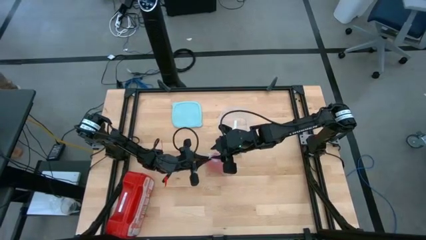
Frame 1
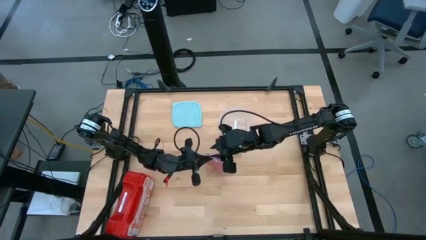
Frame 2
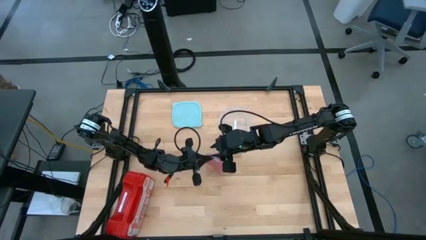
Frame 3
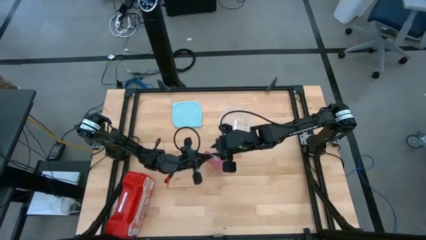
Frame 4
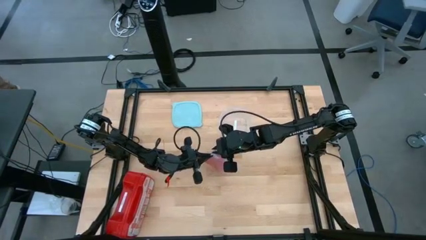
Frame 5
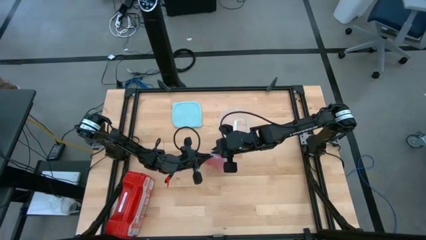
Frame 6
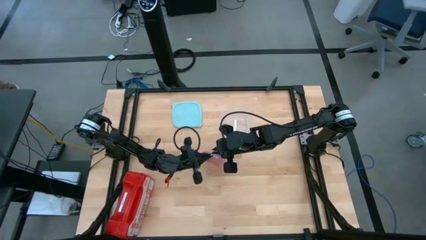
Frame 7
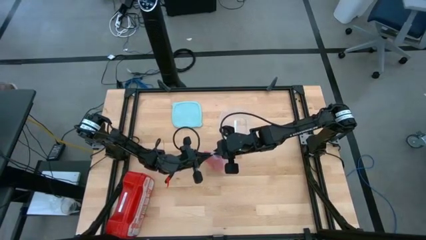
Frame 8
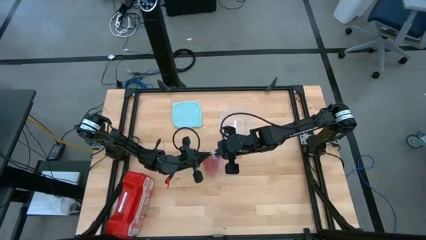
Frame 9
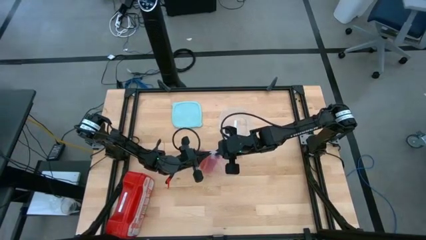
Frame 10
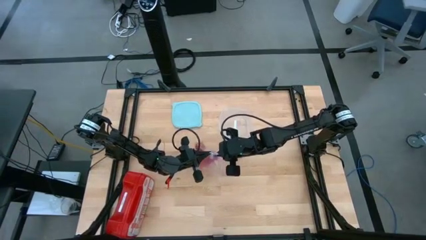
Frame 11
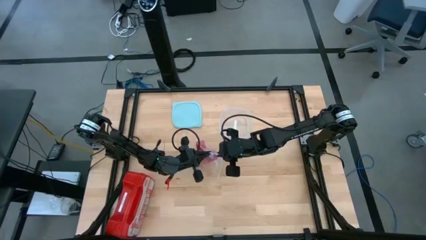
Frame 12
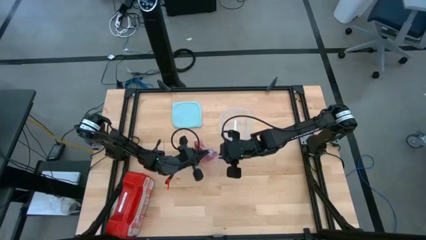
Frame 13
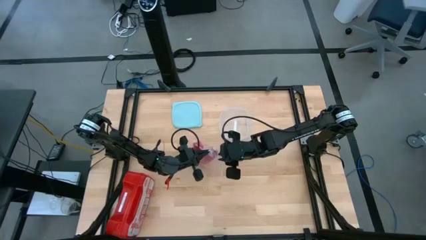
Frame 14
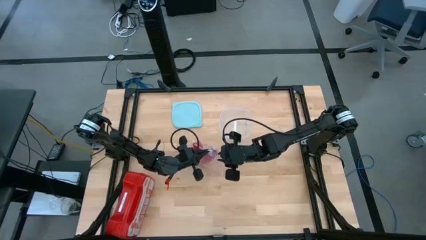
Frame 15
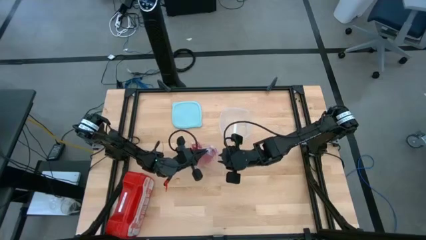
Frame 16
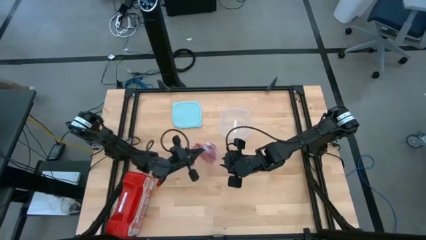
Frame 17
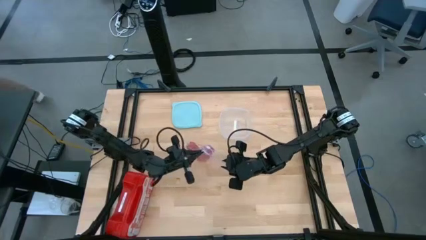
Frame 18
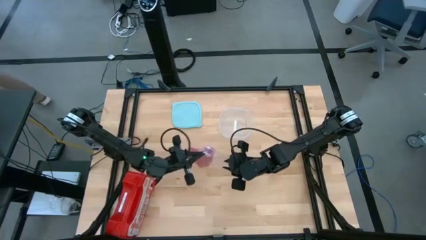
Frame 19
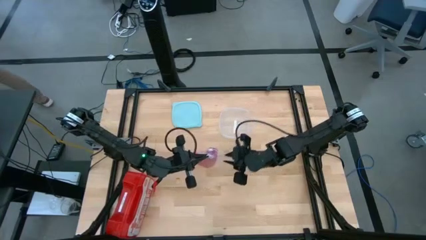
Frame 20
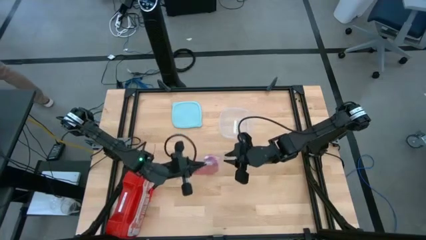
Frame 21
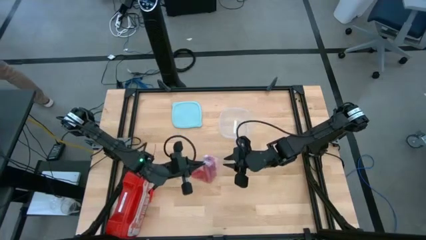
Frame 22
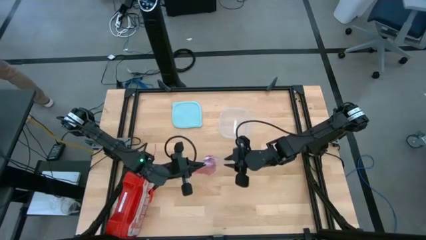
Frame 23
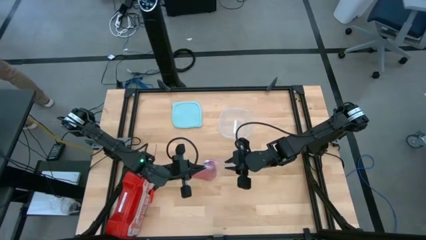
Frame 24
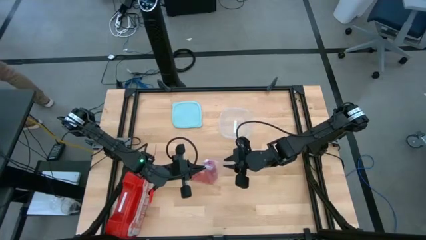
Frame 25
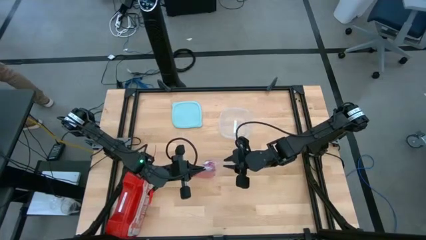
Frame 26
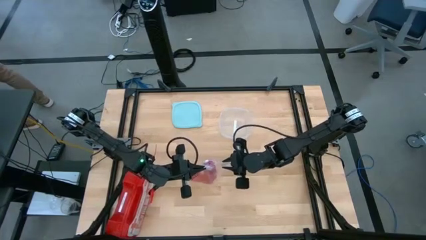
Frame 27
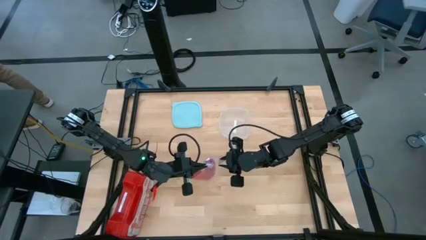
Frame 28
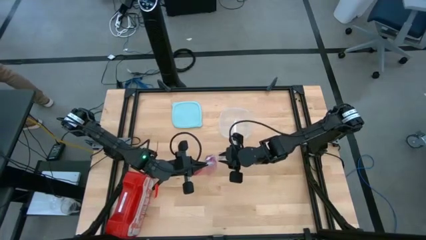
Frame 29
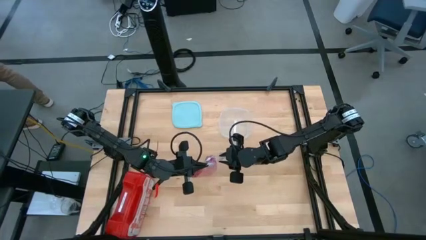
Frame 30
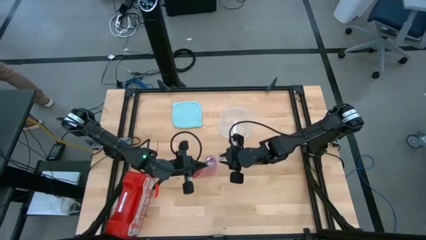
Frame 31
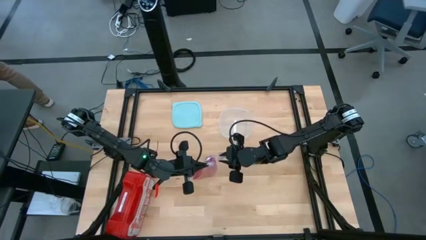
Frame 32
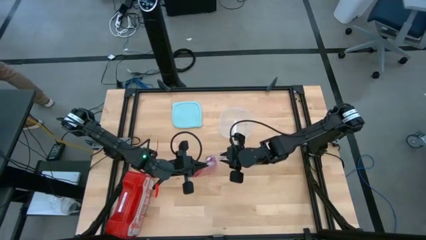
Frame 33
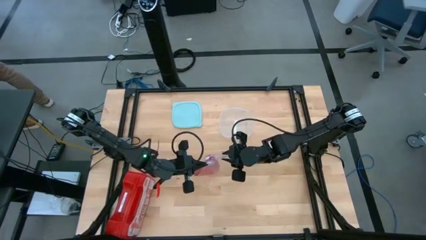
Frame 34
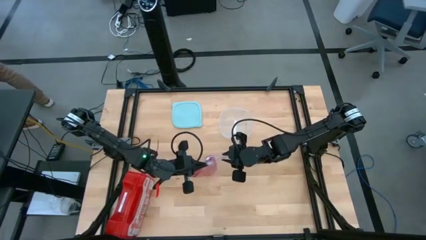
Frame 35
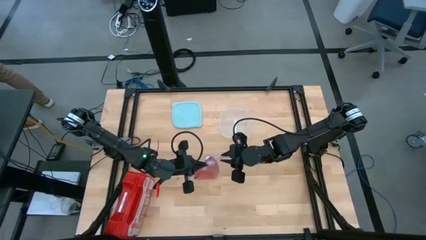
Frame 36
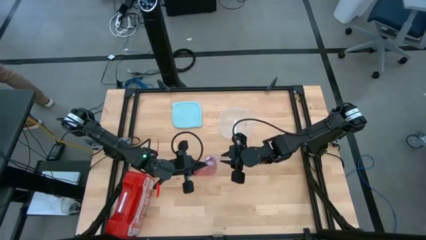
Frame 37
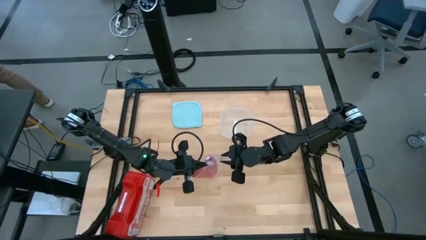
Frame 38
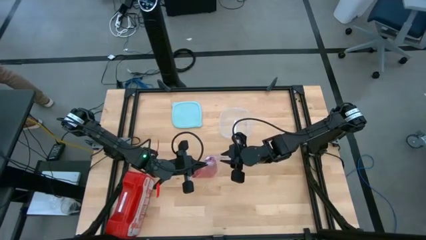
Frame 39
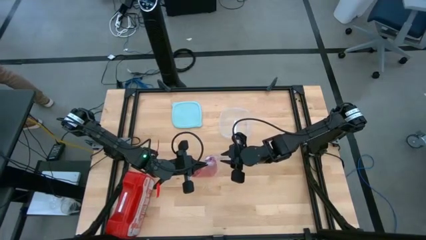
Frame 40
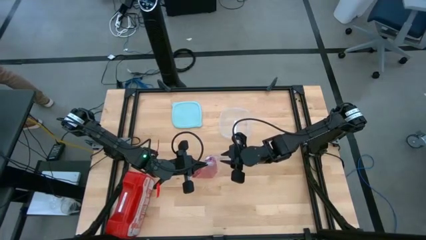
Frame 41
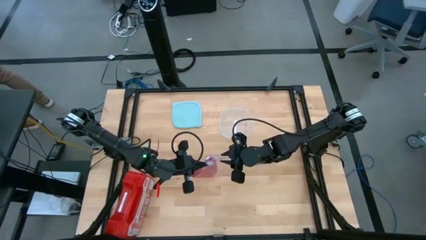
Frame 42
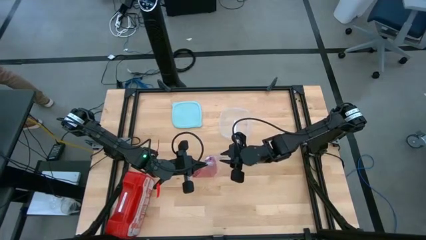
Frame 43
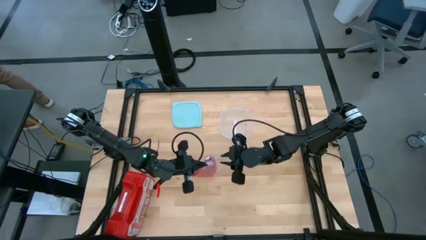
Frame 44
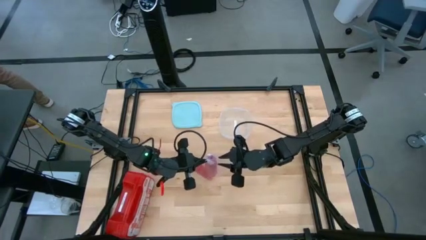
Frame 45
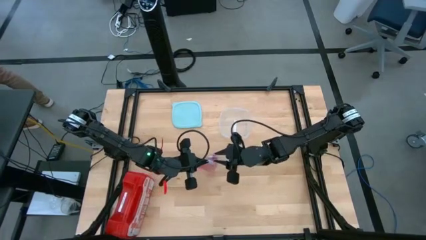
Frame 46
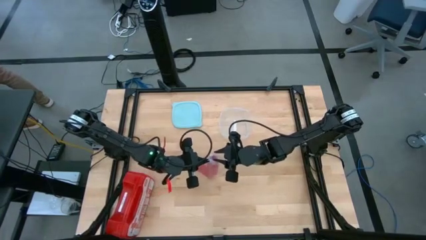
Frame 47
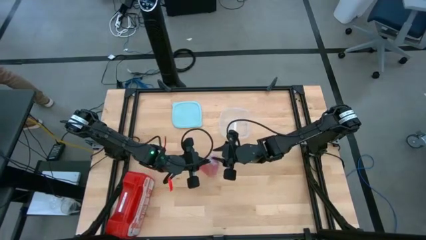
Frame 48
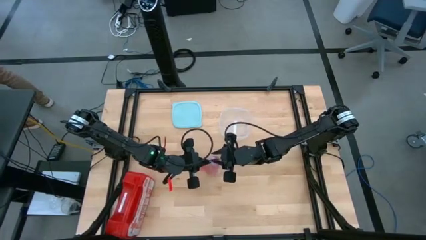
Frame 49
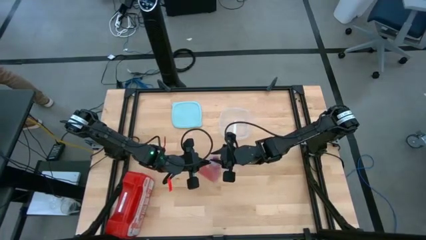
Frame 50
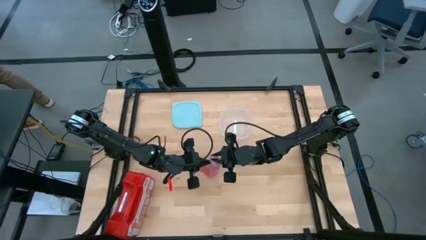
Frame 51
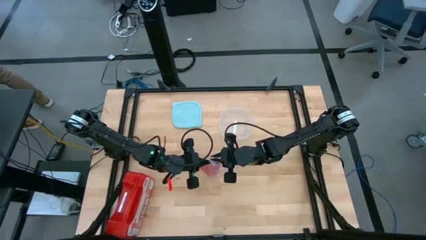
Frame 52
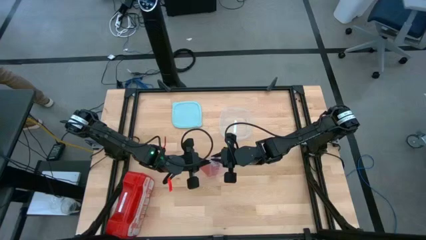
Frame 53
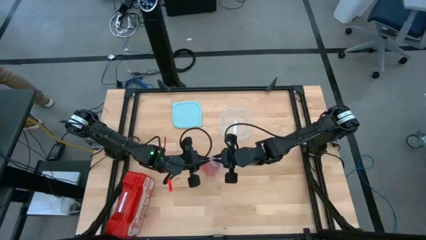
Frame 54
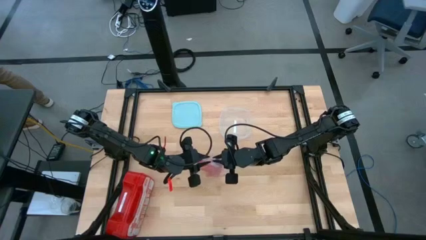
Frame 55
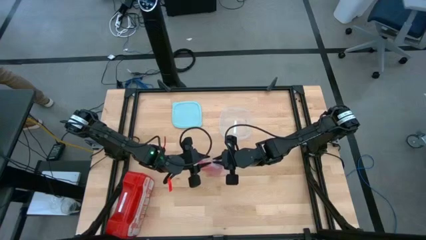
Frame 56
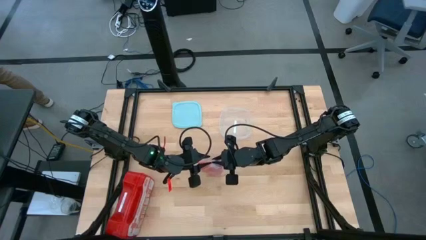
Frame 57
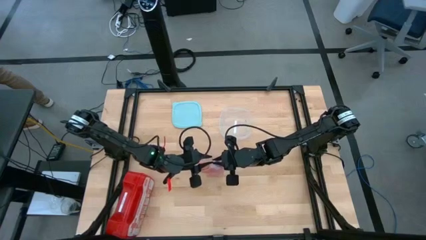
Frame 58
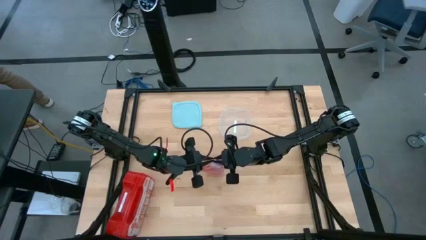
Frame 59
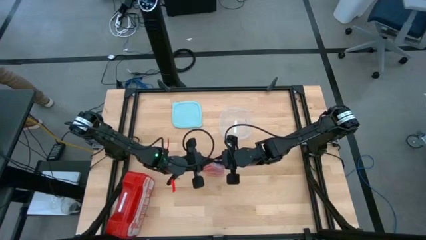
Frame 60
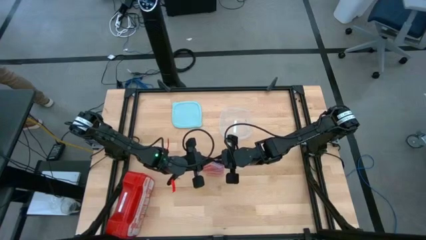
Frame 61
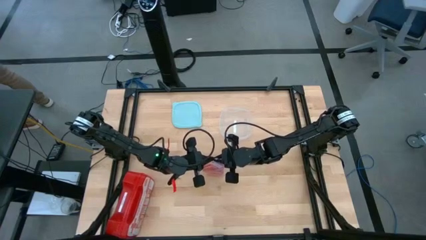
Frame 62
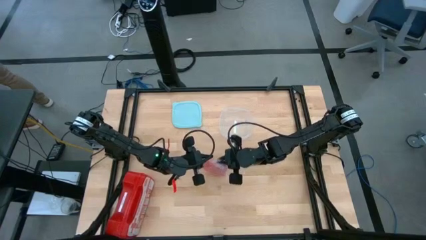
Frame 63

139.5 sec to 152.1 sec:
Task: Roll bandage
Close the transparent zip bag
